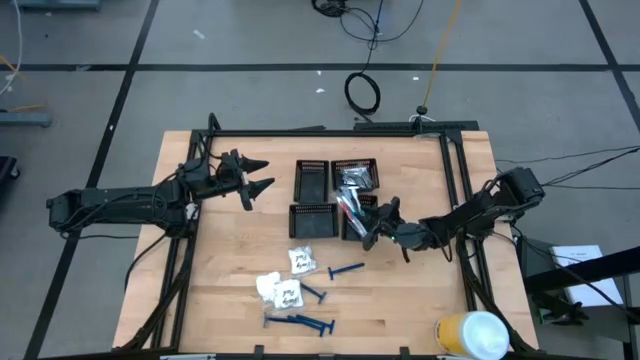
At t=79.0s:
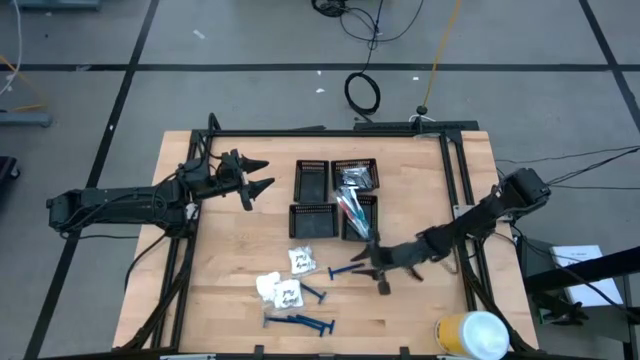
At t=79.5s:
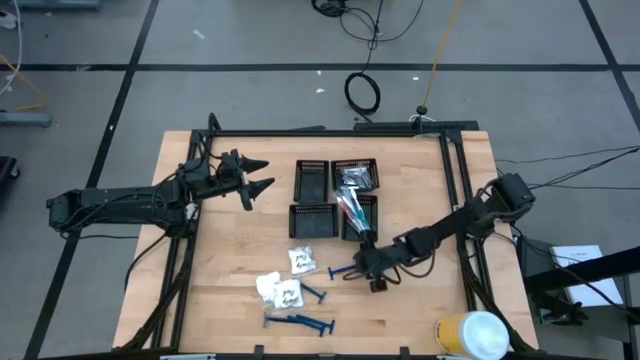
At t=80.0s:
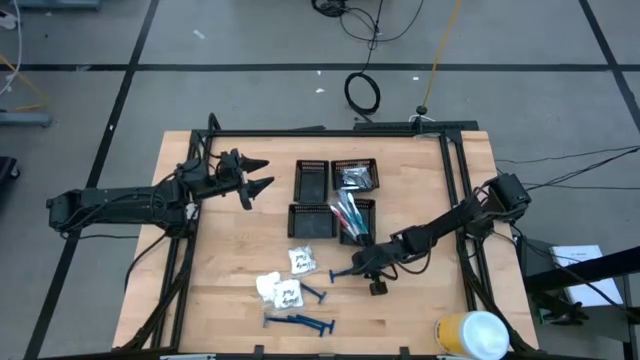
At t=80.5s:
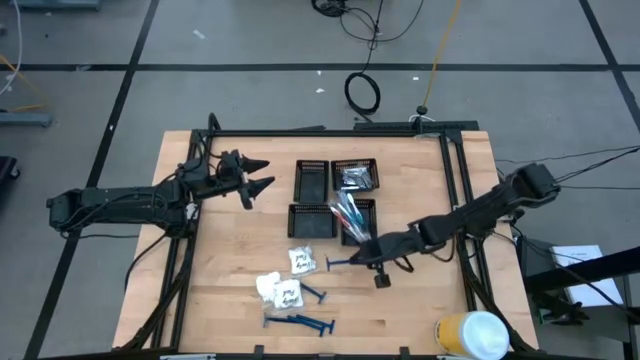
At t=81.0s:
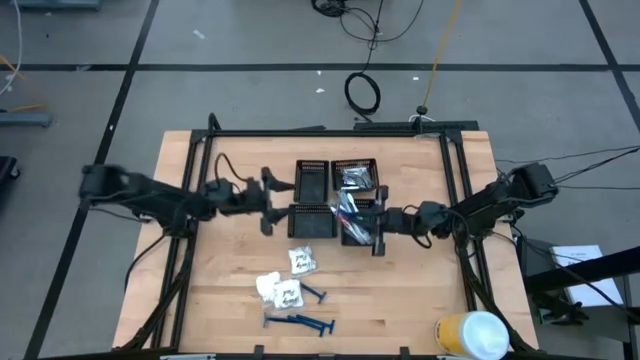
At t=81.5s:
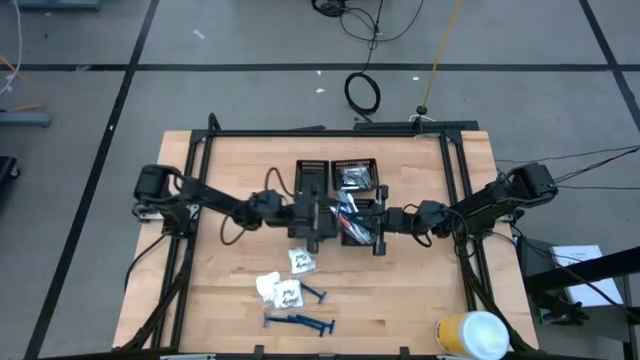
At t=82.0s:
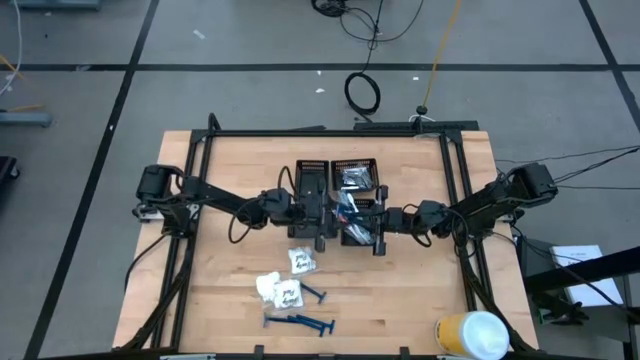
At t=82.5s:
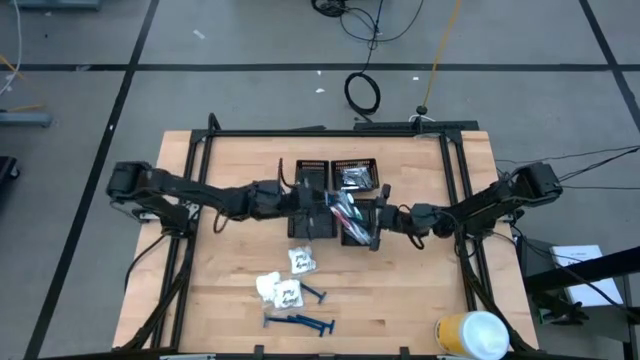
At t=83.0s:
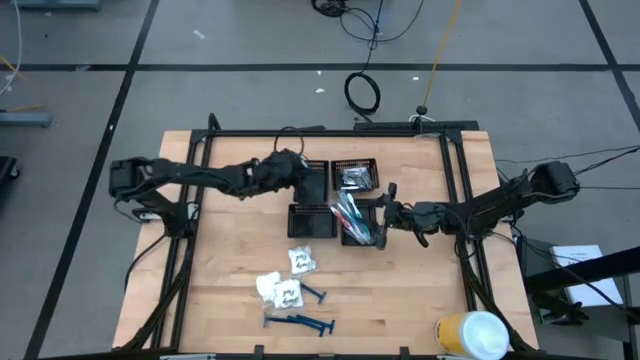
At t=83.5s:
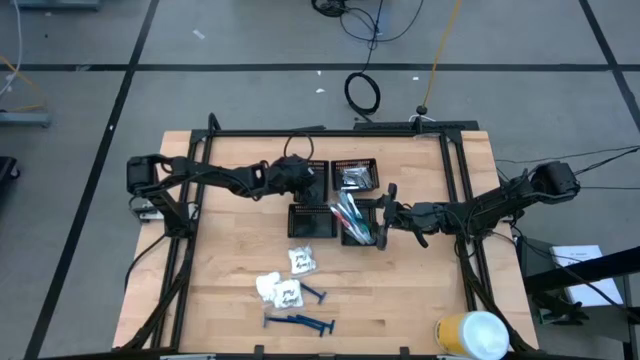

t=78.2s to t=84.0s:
Task: Pick & Place Travel size toiletries
Put the blue razor into the top left black bin

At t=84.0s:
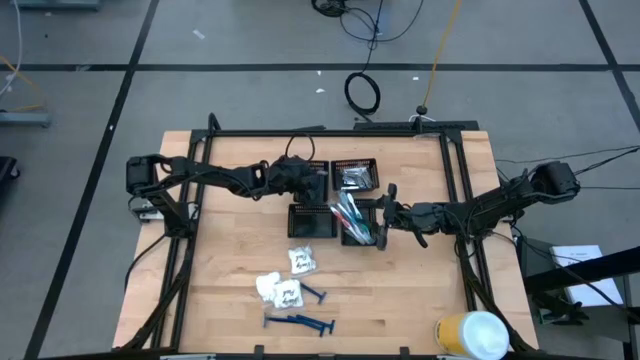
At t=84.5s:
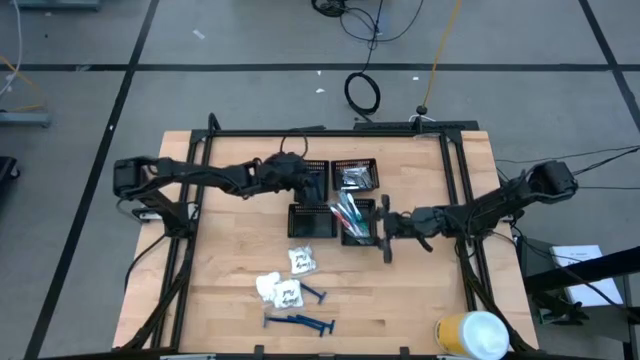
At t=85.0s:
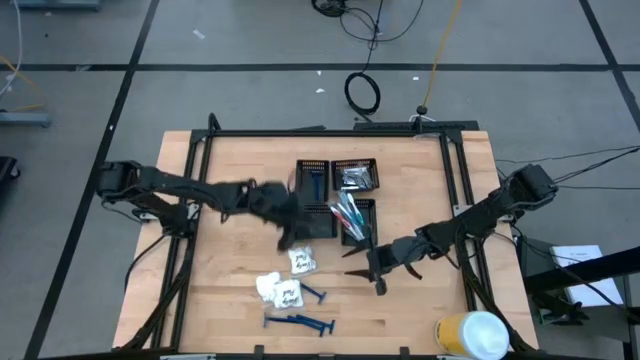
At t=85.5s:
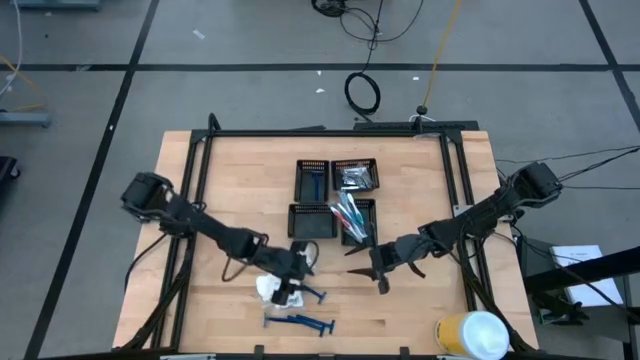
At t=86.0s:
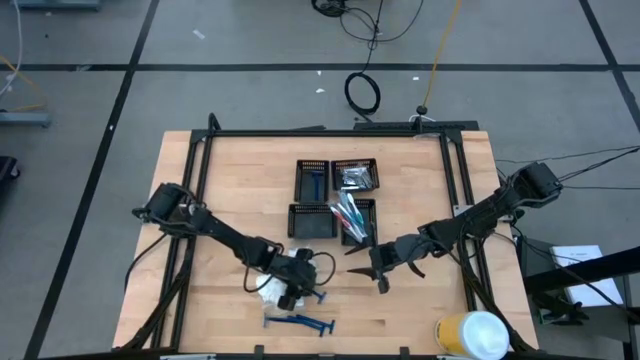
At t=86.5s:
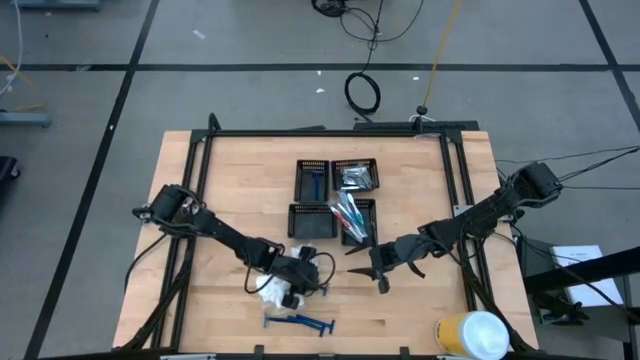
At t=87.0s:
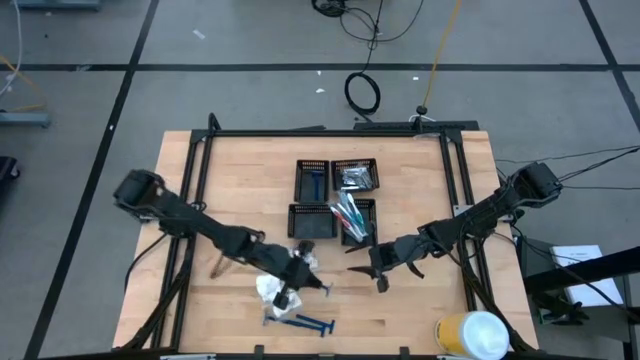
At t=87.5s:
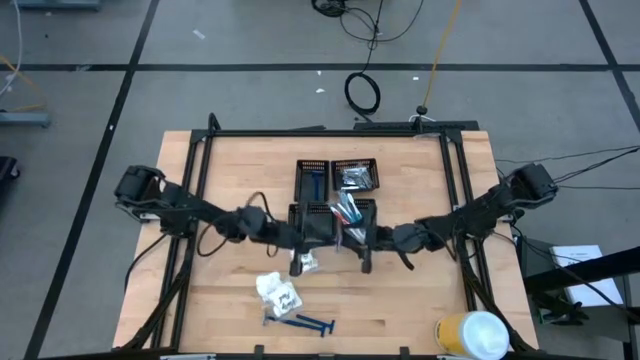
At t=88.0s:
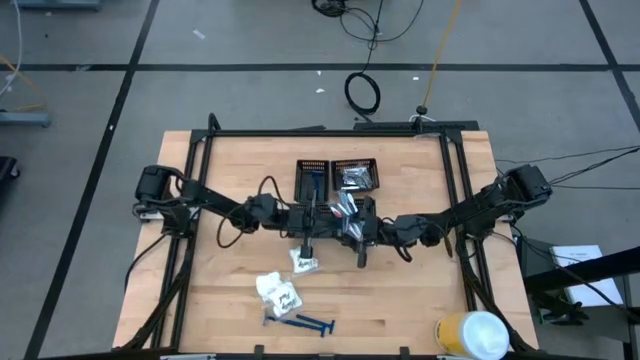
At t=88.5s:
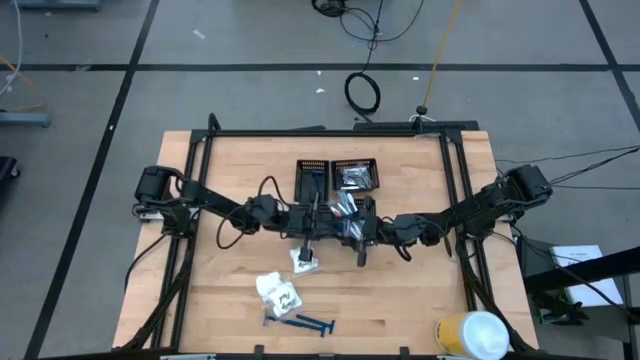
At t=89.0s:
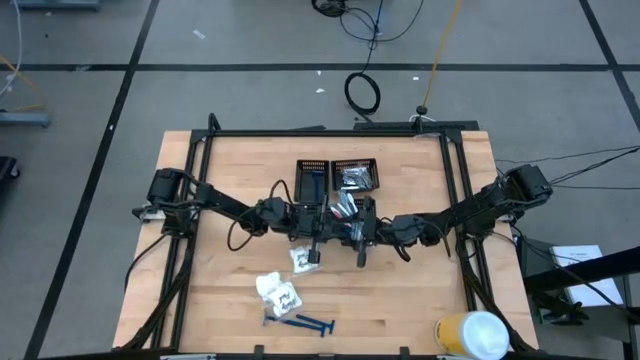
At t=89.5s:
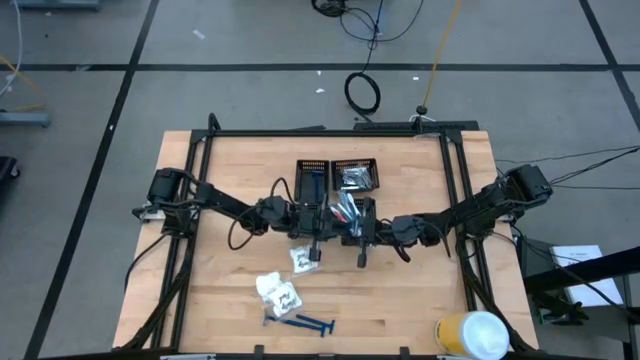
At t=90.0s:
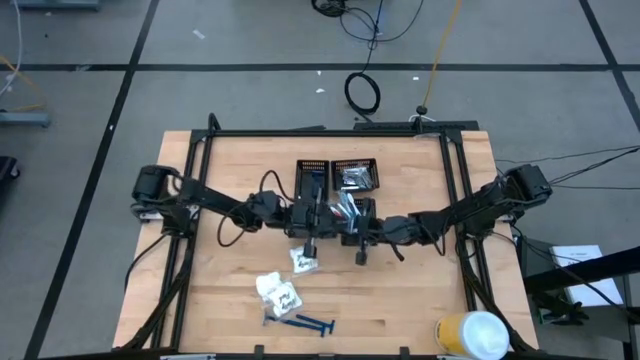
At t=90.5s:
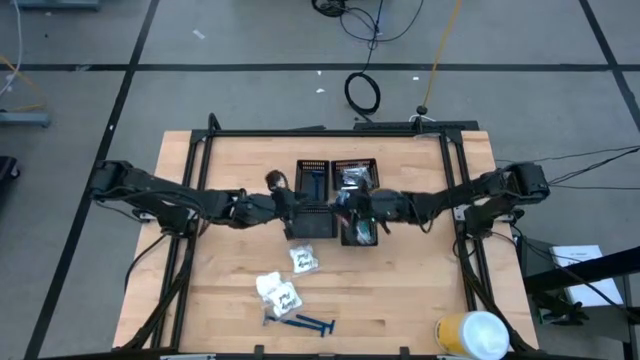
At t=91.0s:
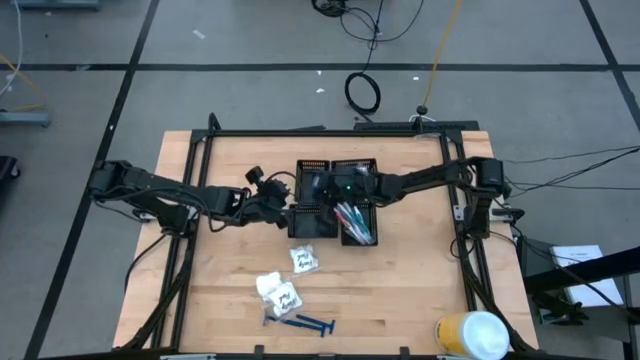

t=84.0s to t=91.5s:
Put the blue razor into the top left black bin

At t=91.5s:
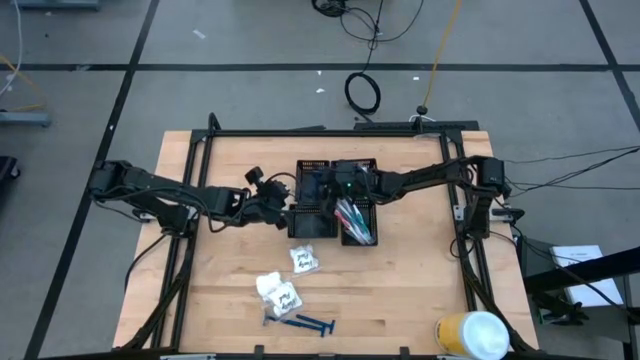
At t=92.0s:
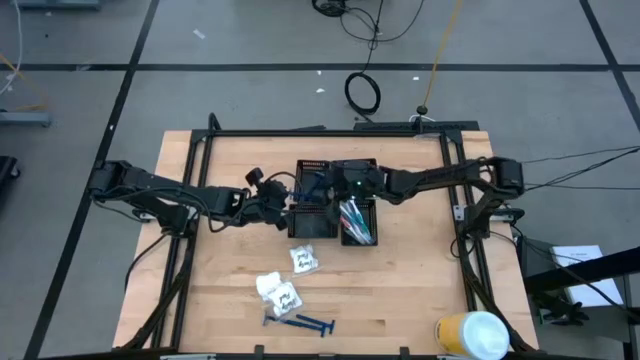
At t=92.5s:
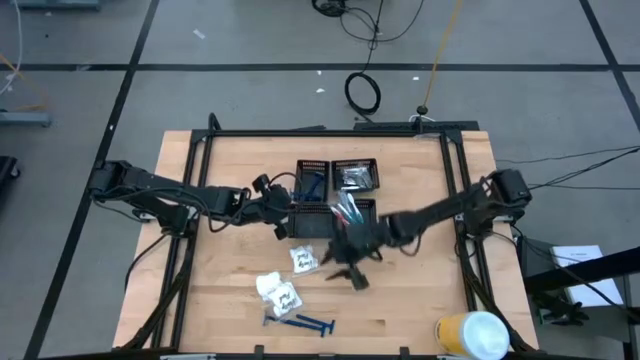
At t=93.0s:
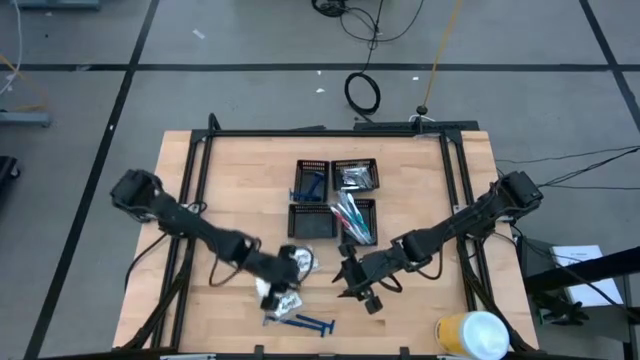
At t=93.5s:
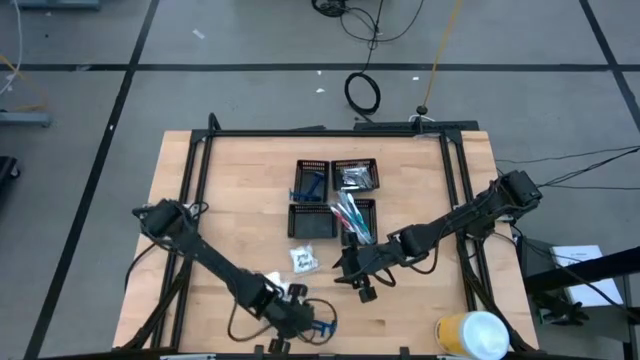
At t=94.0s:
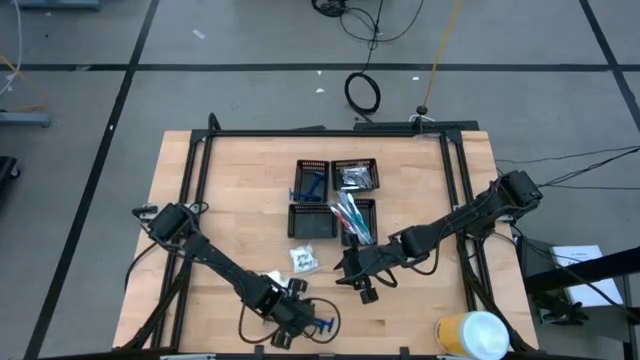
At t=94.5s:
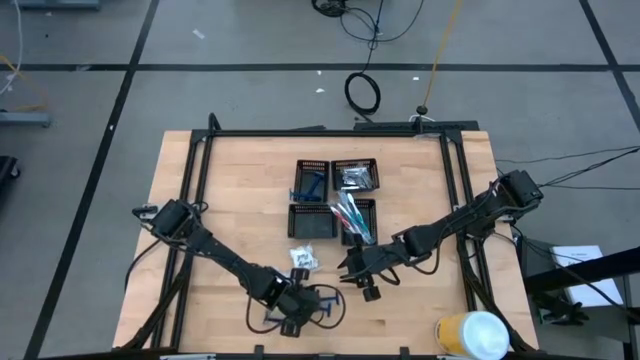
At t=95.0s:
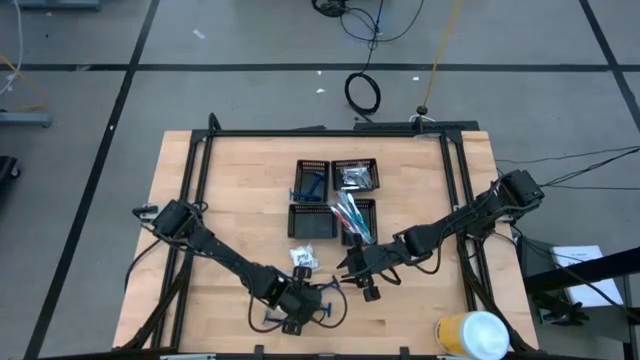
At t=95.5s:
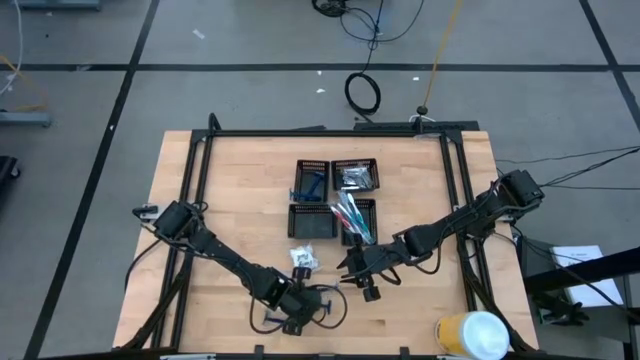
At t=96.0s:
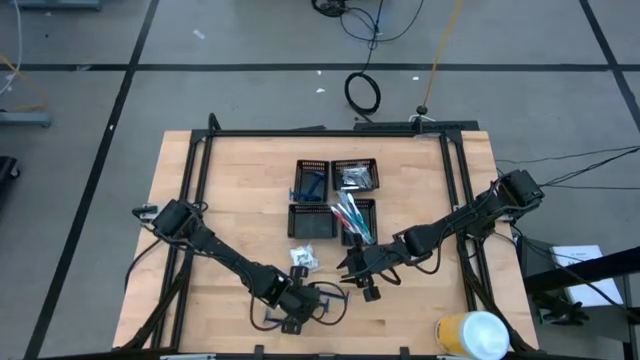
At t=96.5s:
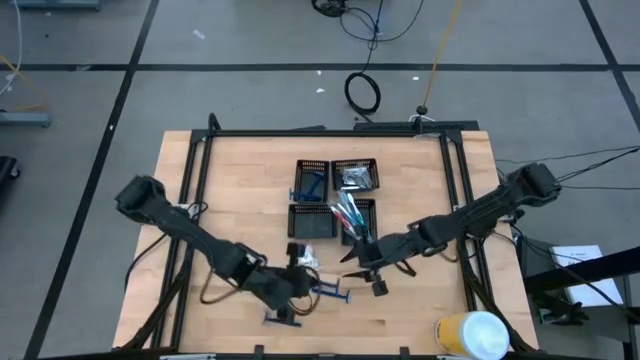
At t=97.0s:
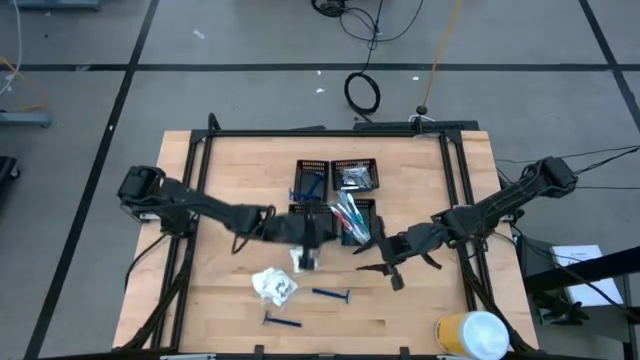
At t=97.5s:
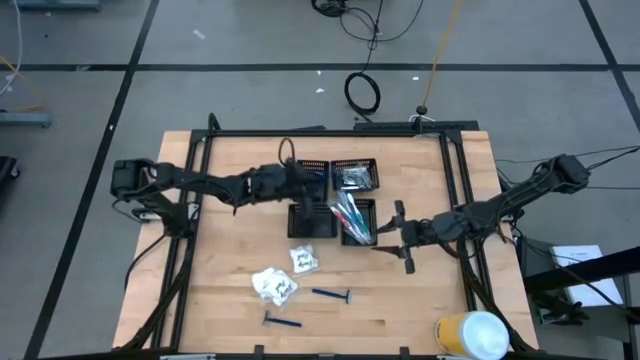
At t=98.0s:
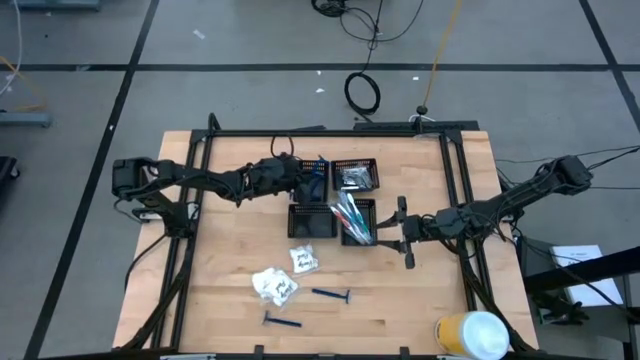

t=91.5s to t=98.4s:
Put the blue razor into the top left black bin
